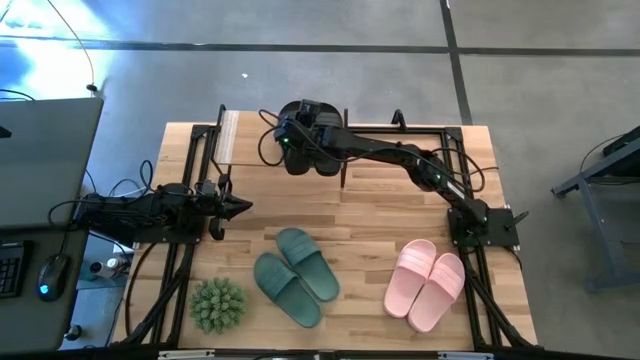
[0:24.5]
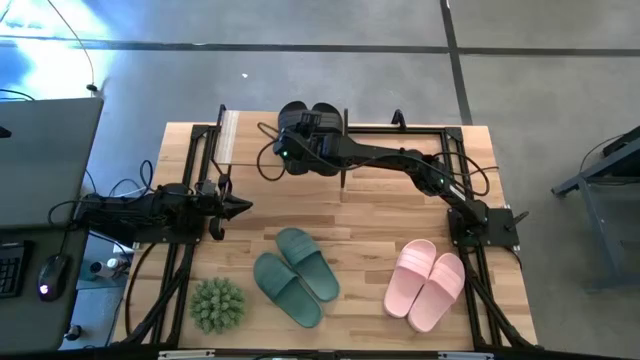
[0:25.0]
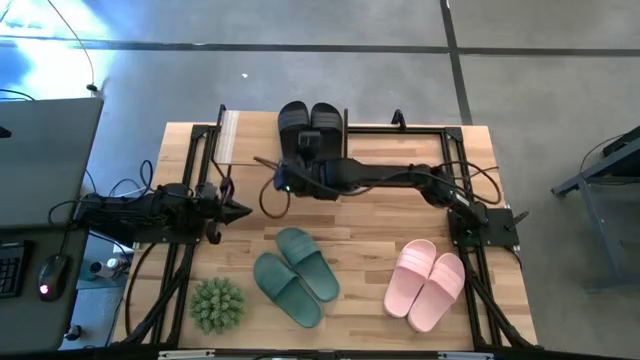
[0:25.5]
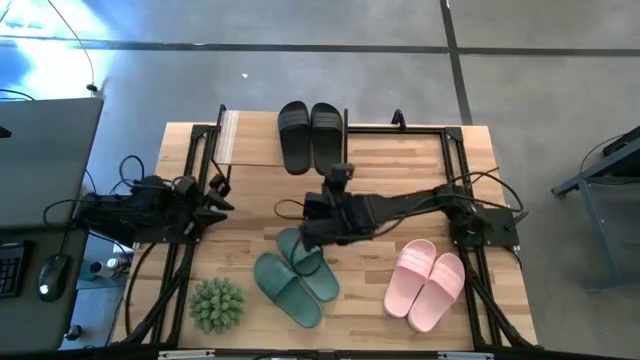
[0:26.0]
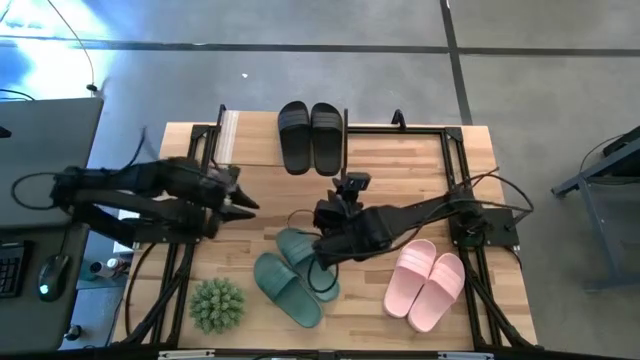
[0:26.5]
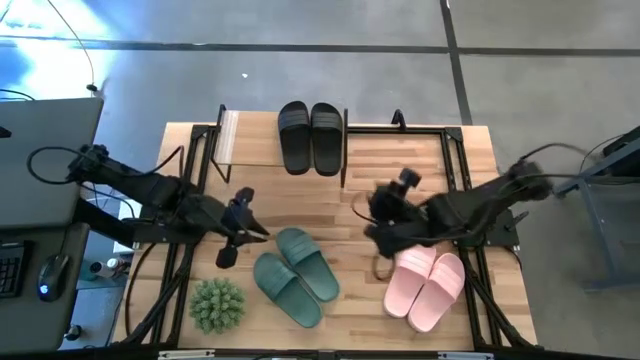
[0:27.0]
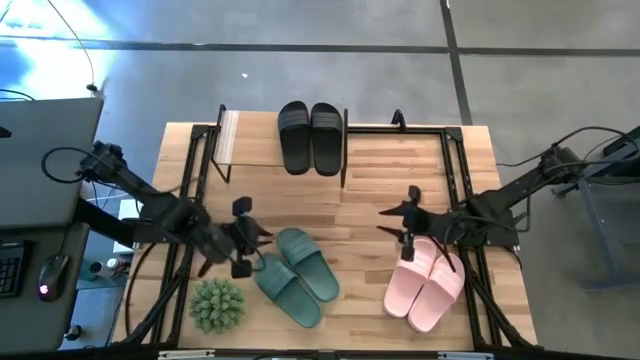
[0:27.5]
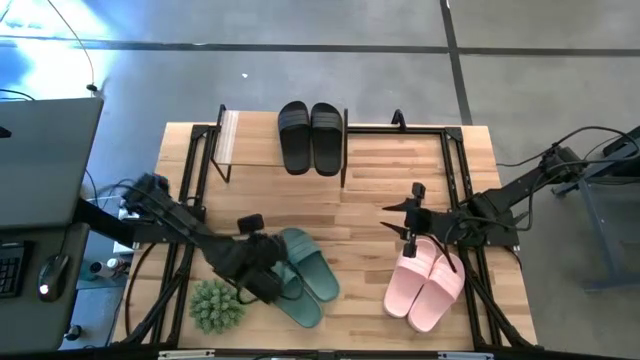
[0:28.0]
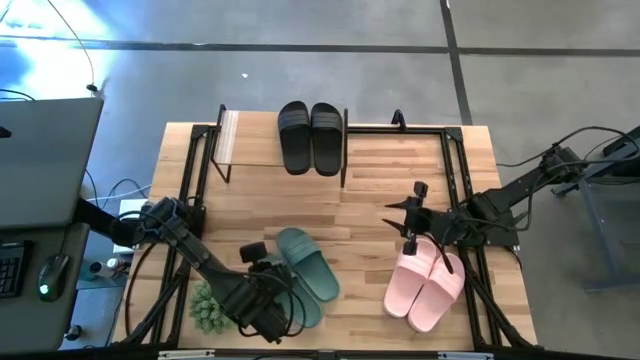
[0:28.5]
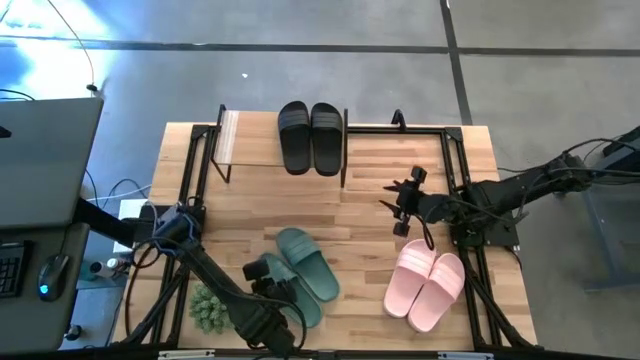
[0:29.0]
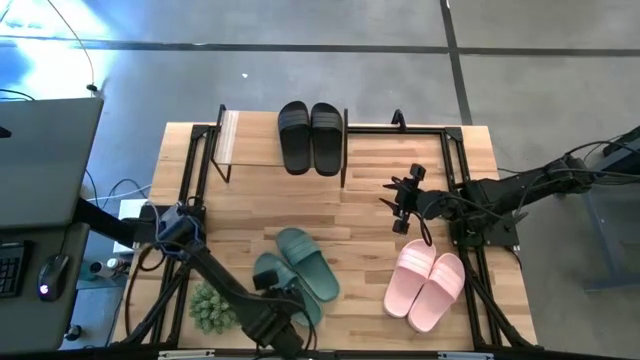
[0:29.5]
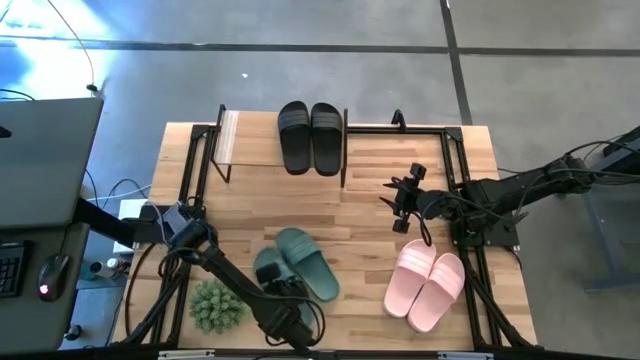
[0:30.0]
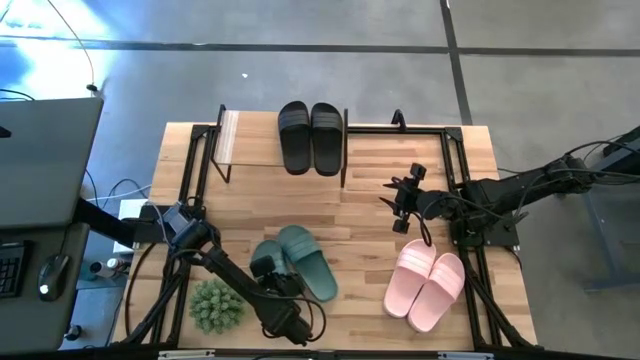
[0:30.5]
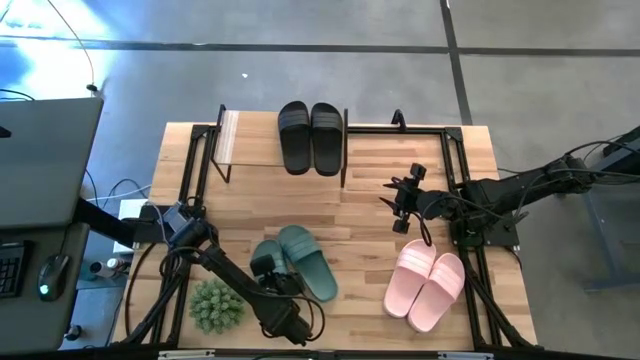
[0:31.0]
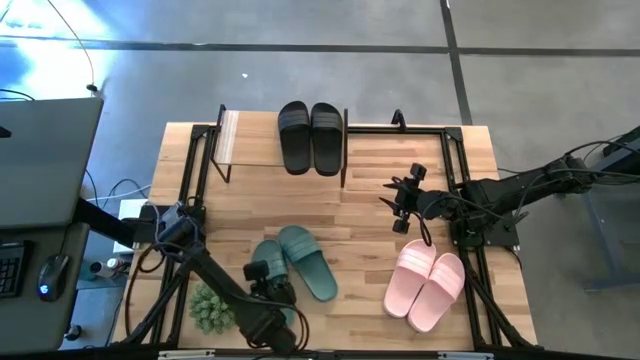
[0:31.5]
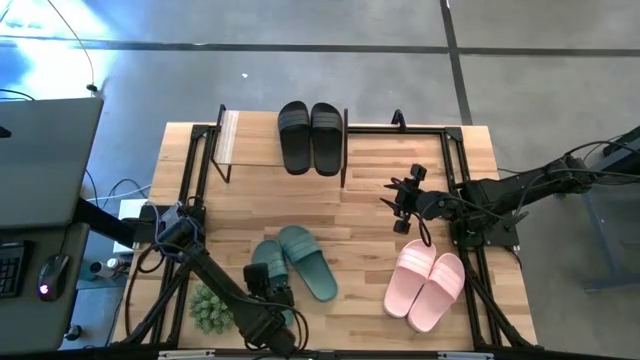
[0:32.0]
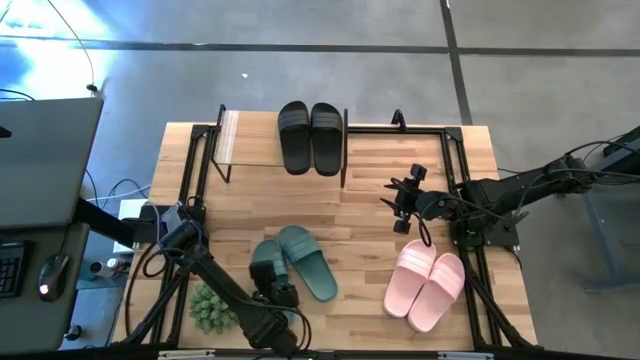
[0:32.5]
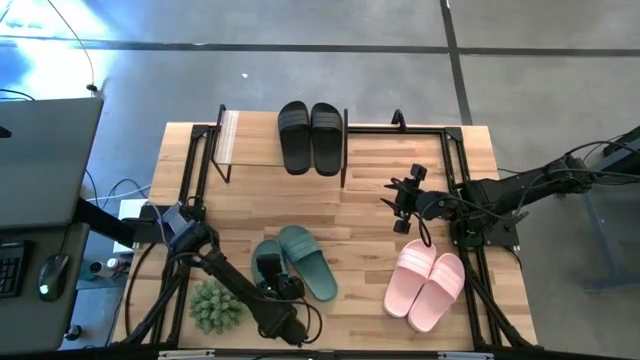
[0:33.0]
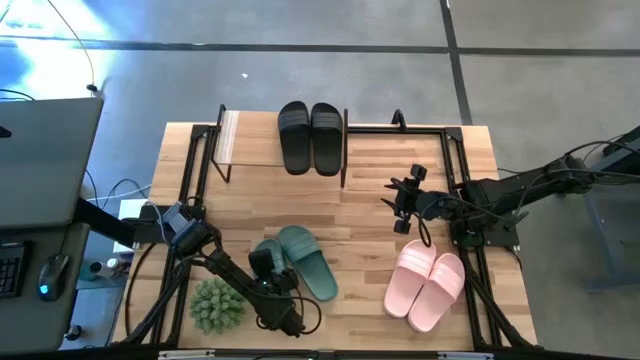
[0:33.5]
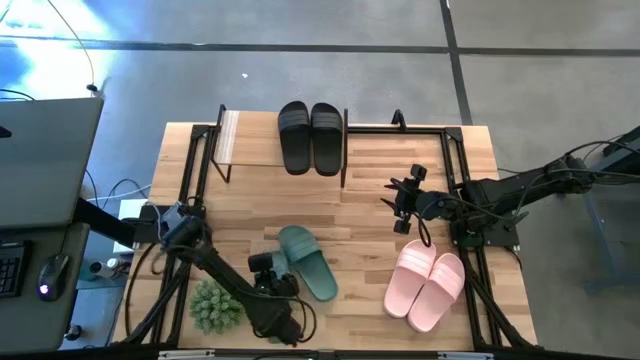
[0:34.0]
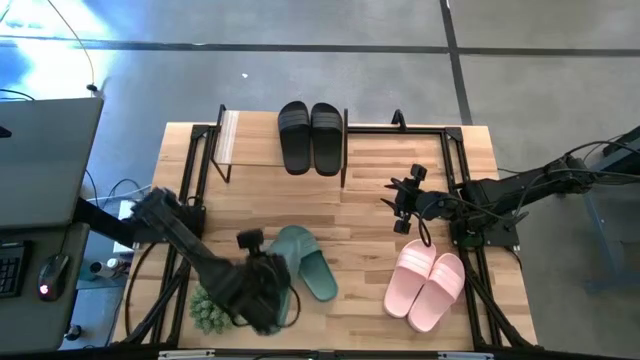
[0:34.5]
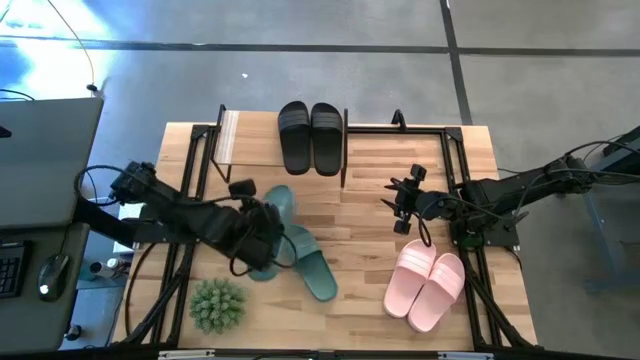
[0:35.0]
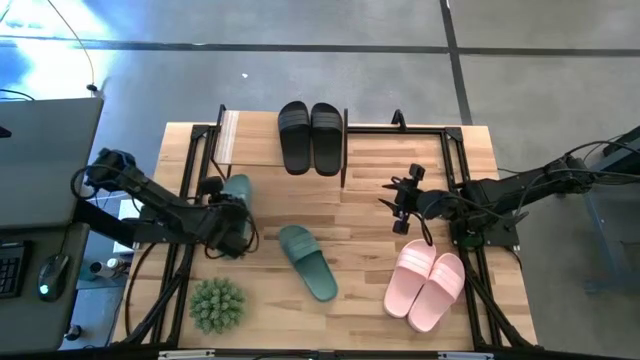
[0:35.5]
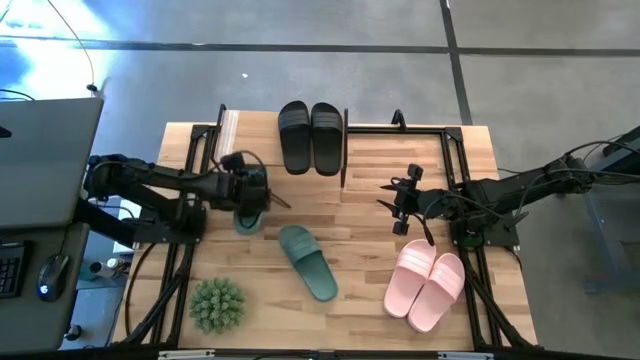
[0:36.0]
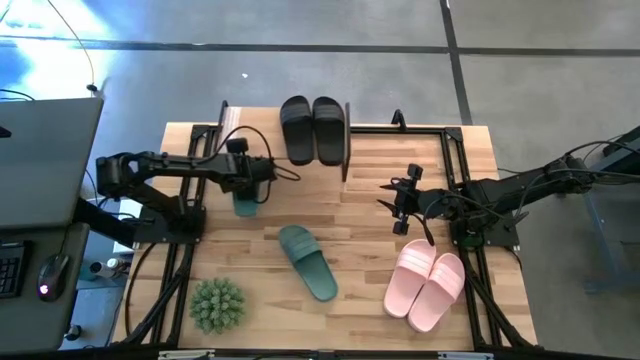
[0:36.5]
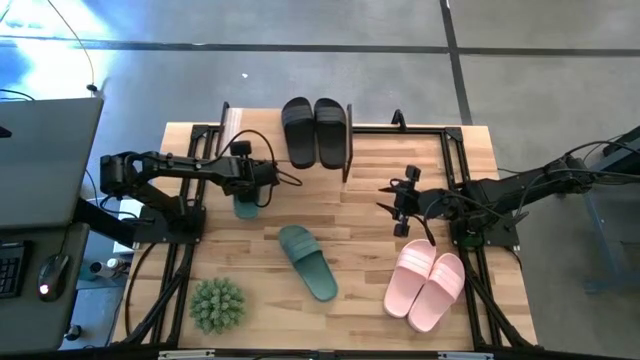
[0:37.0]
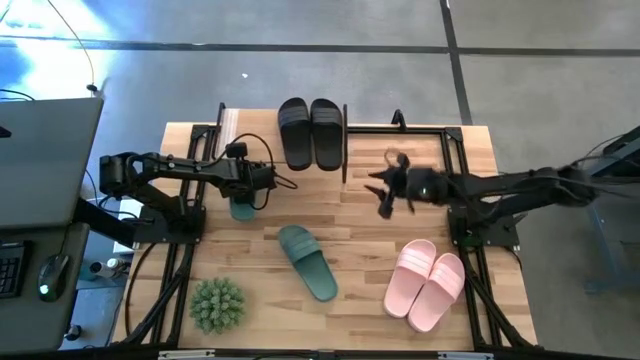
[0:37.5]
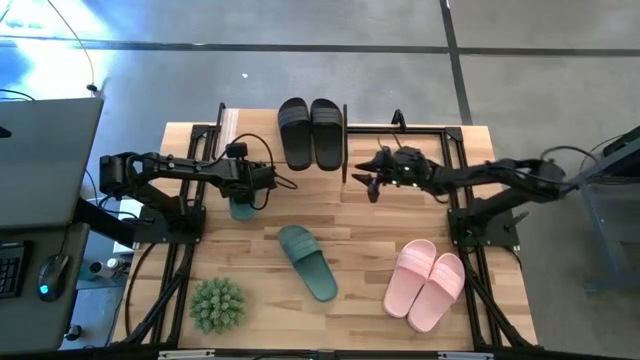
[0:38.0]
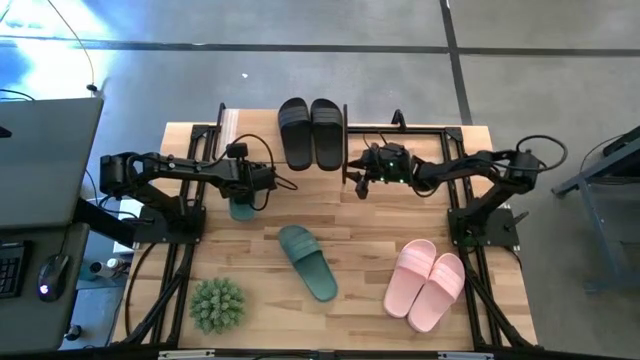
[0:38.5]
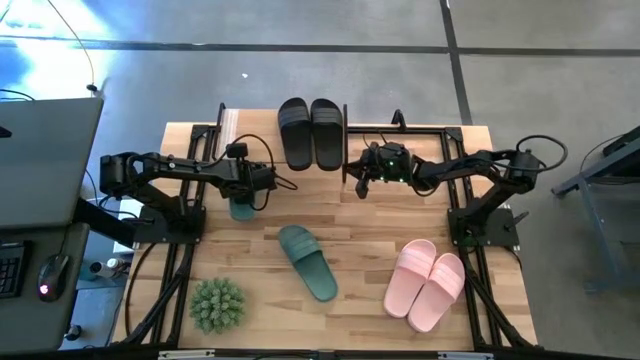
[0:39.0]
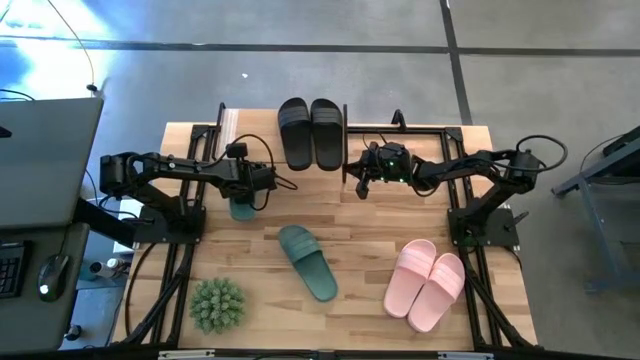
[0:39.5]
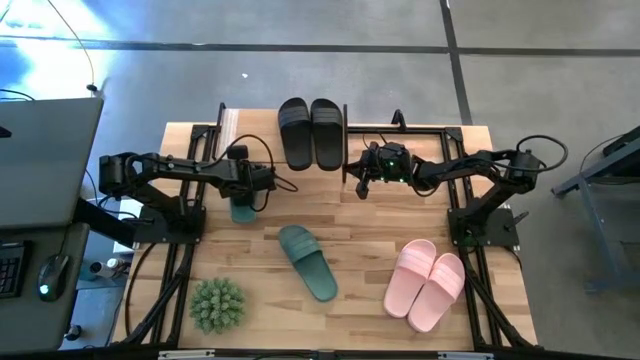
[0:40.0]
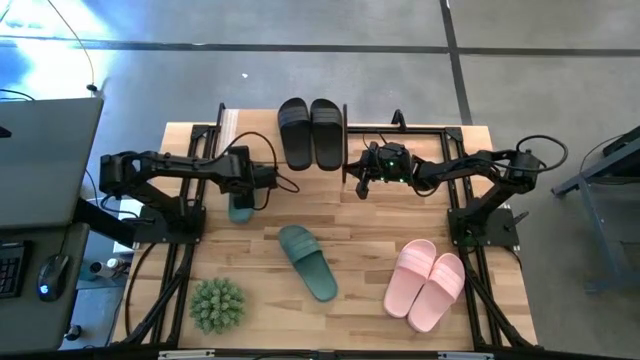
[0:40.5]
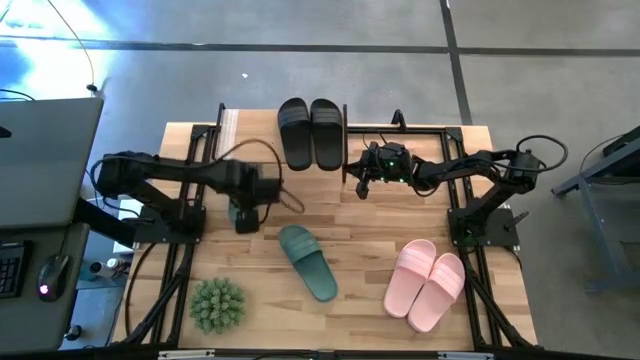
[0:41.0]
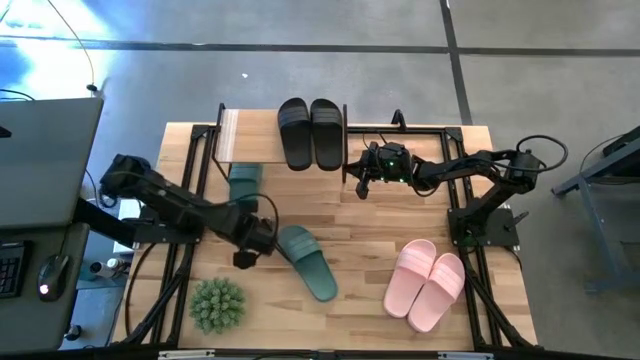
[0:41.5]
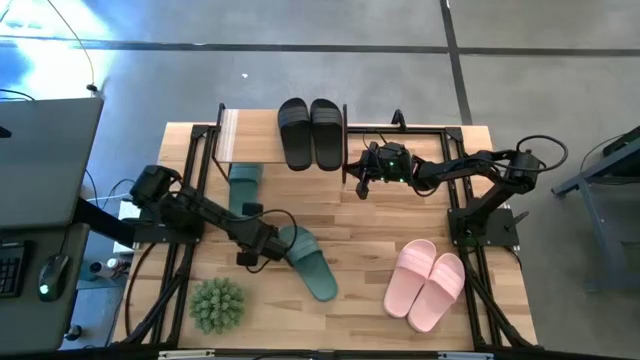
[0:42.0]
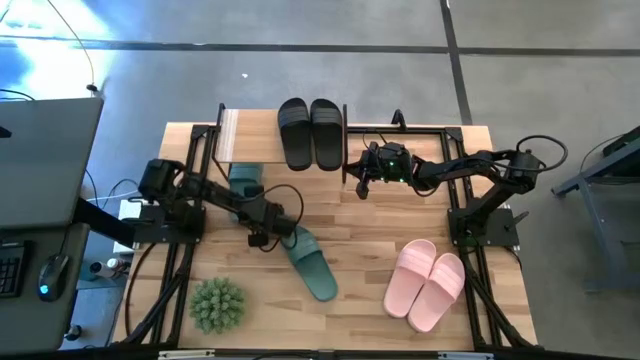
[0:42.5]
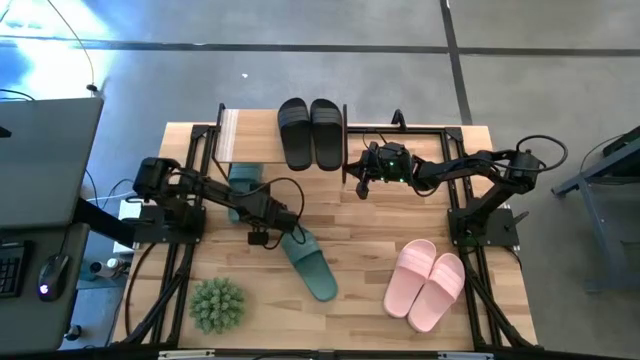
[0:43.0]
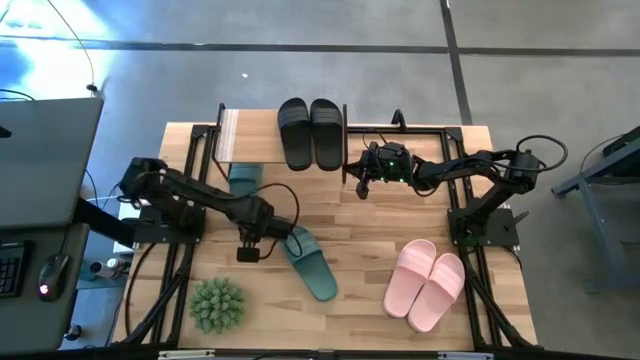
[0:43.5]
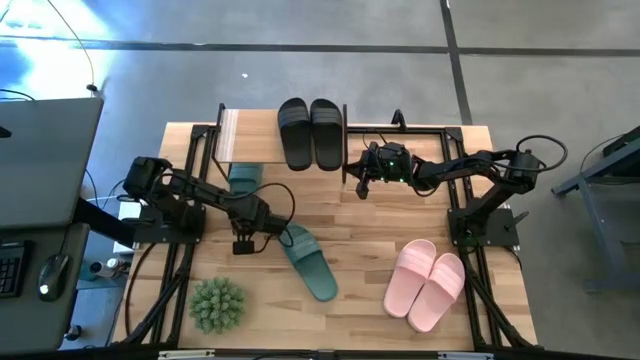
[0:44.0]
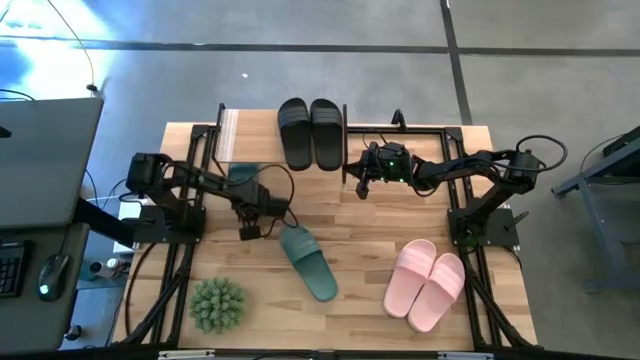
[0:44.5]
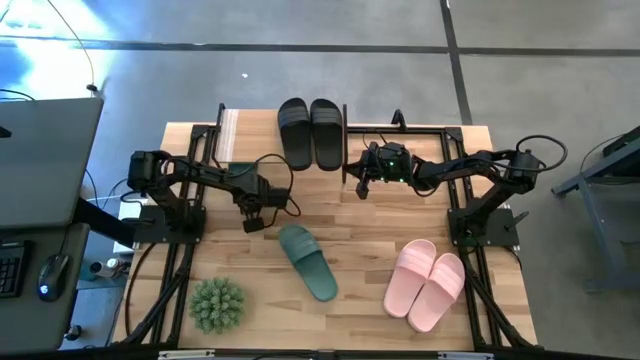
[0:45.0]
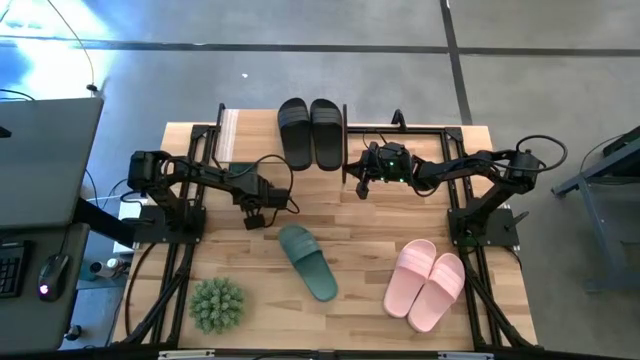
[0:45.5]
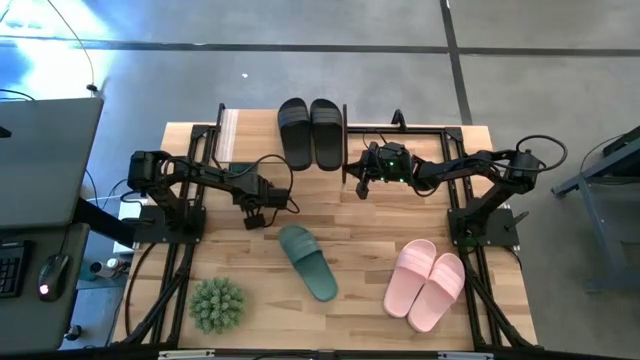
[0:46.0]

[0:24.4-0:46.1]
Task: Pick and place slides into the shelf
Put the left green slide under the shelf
